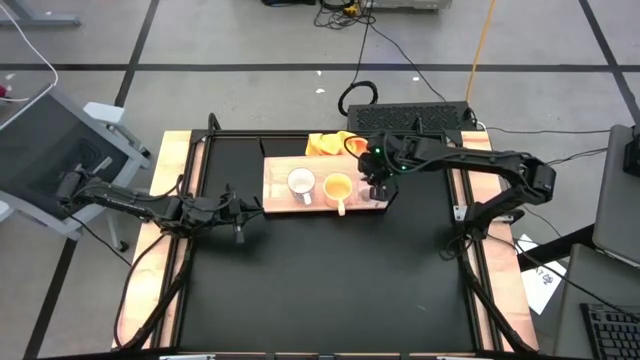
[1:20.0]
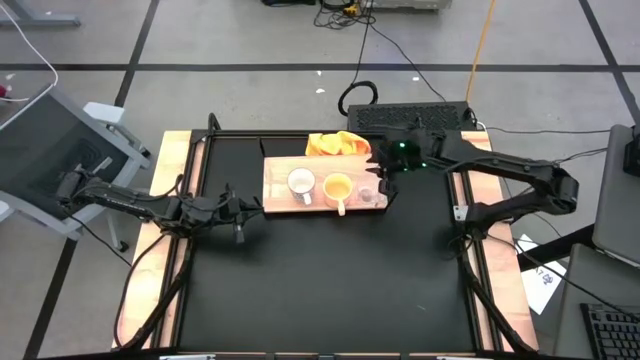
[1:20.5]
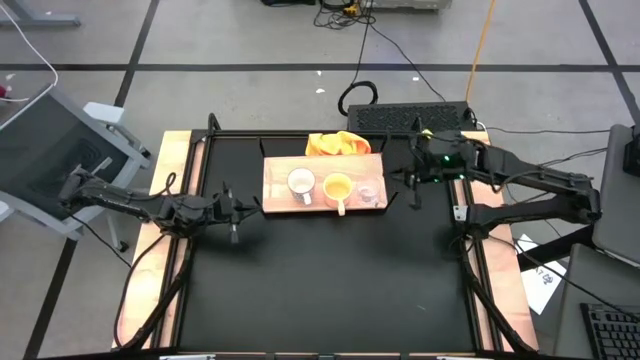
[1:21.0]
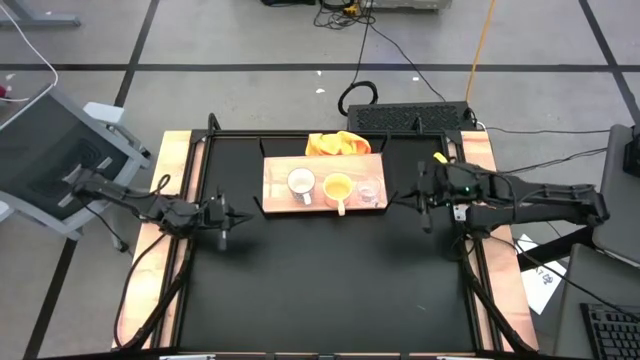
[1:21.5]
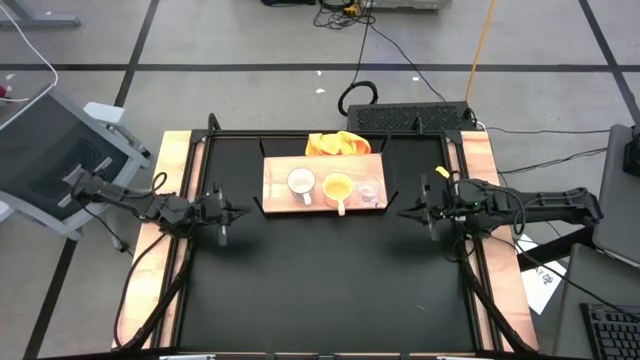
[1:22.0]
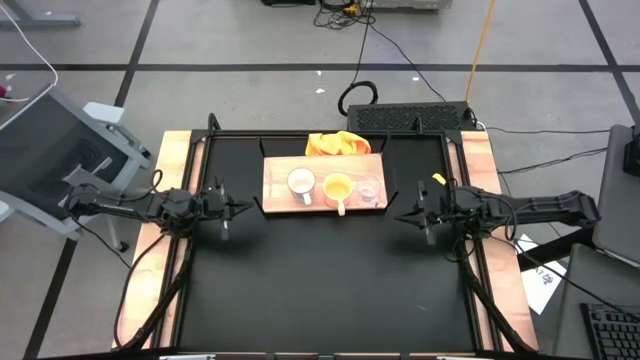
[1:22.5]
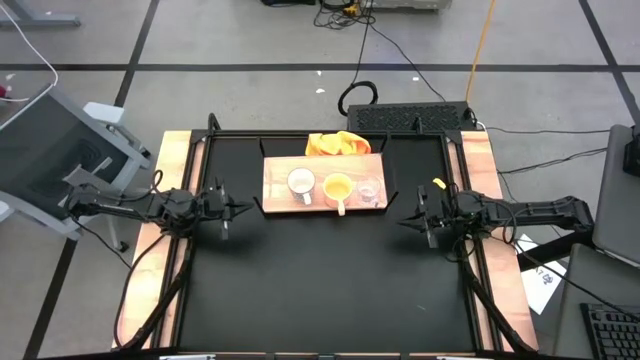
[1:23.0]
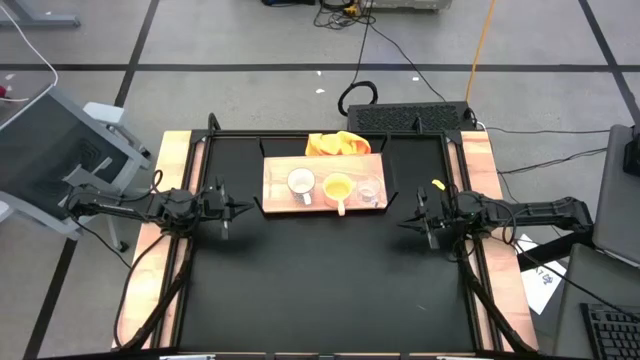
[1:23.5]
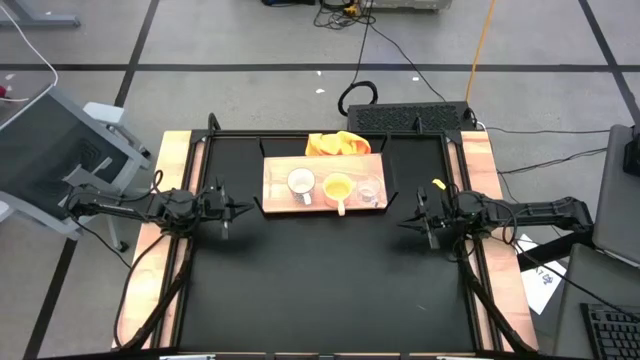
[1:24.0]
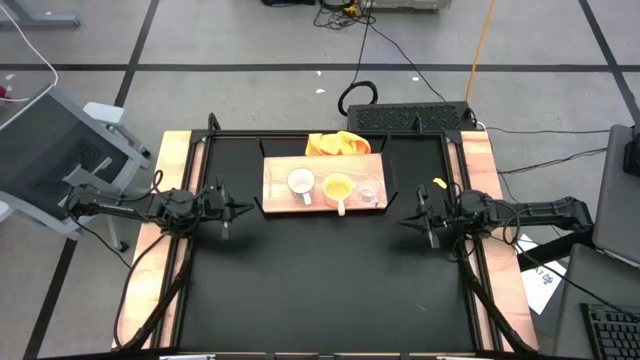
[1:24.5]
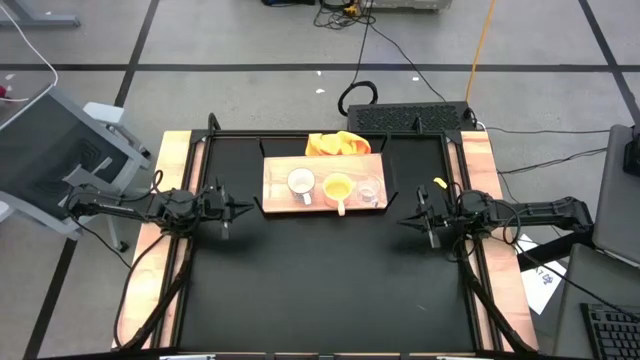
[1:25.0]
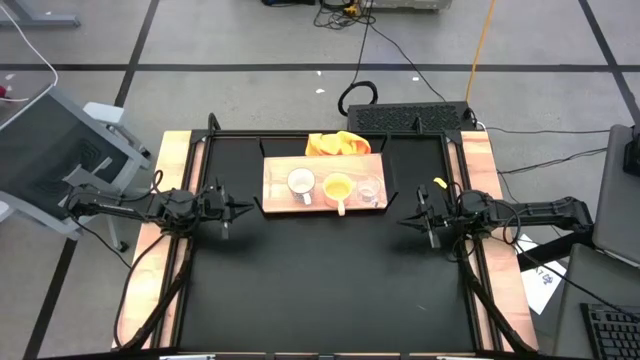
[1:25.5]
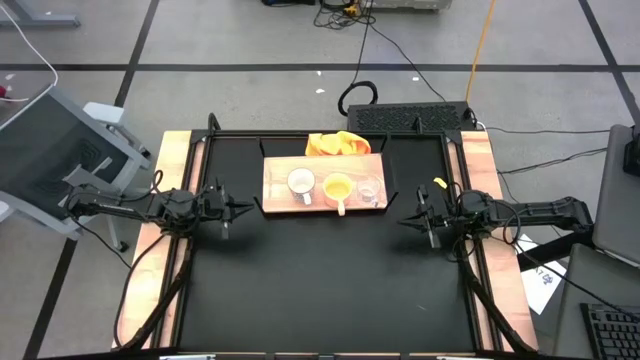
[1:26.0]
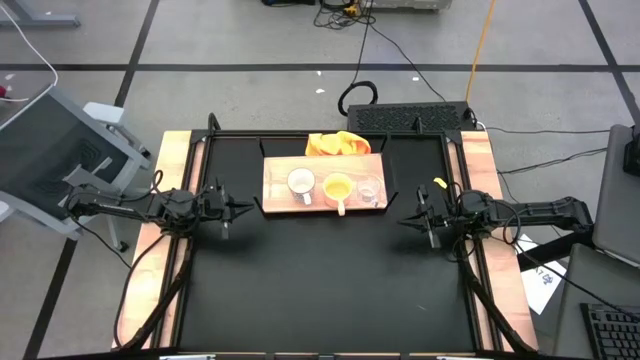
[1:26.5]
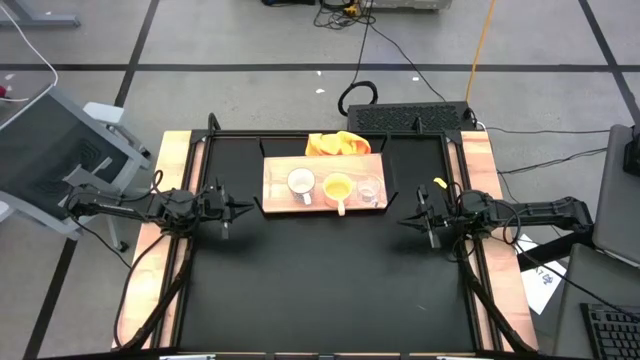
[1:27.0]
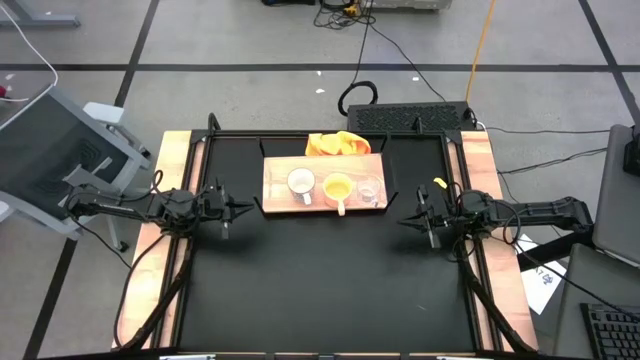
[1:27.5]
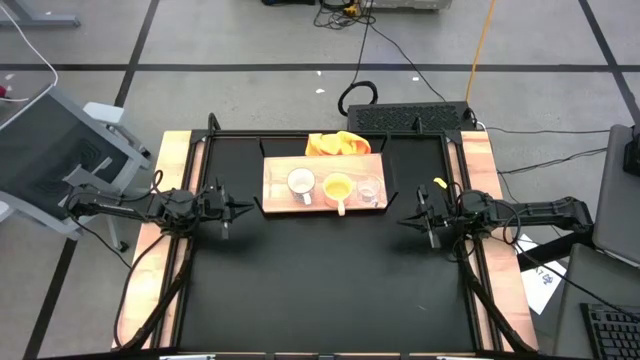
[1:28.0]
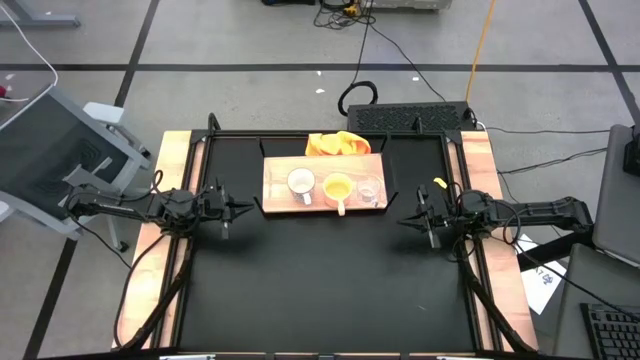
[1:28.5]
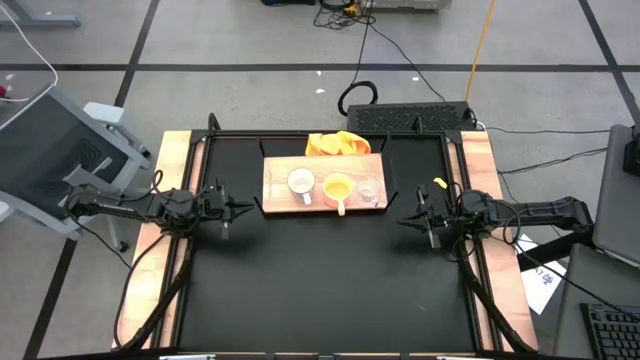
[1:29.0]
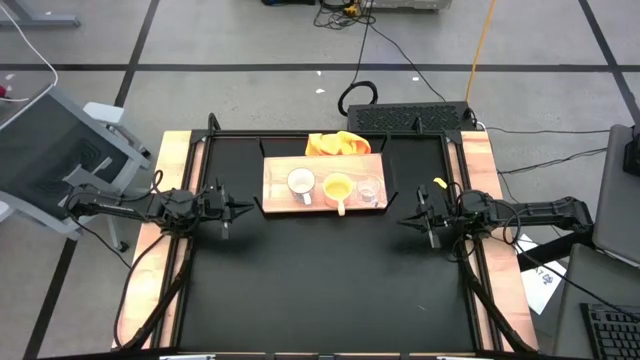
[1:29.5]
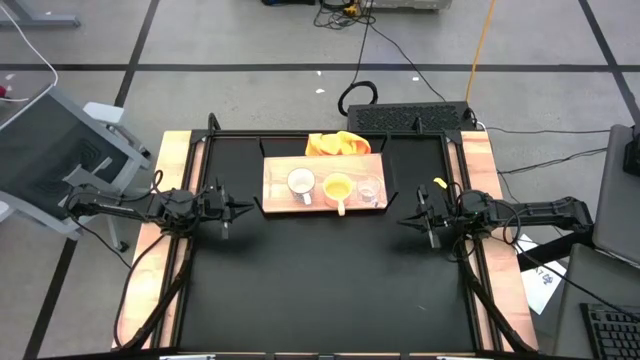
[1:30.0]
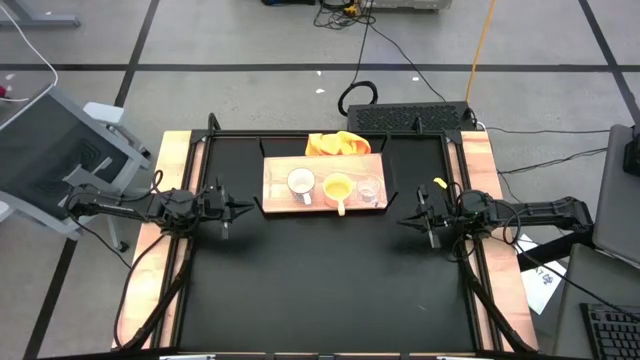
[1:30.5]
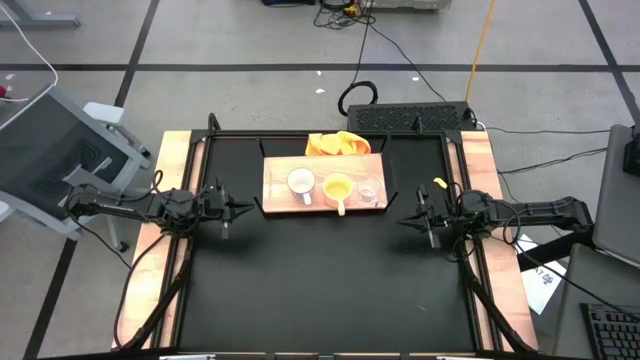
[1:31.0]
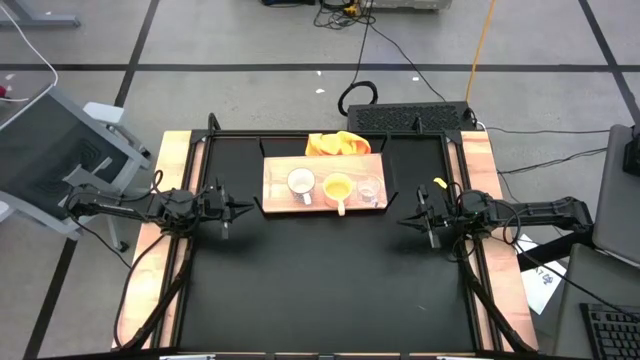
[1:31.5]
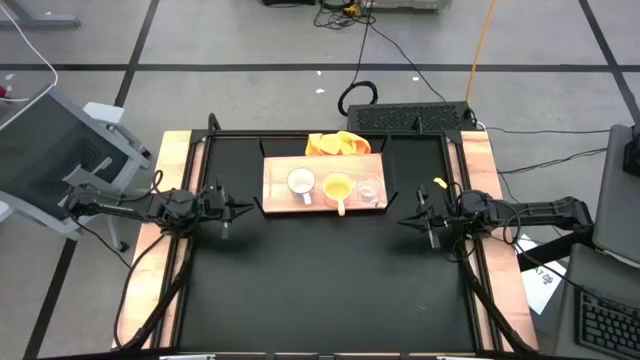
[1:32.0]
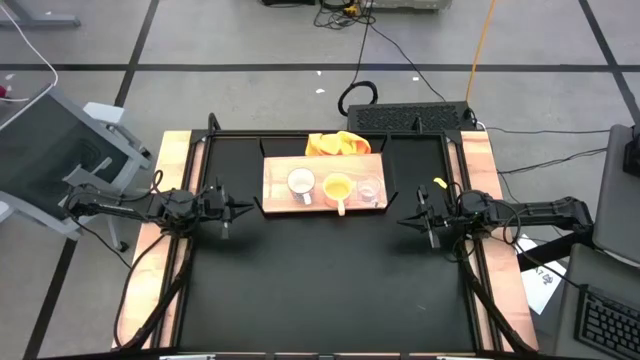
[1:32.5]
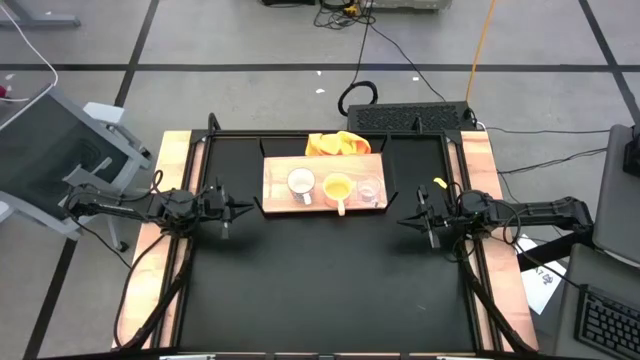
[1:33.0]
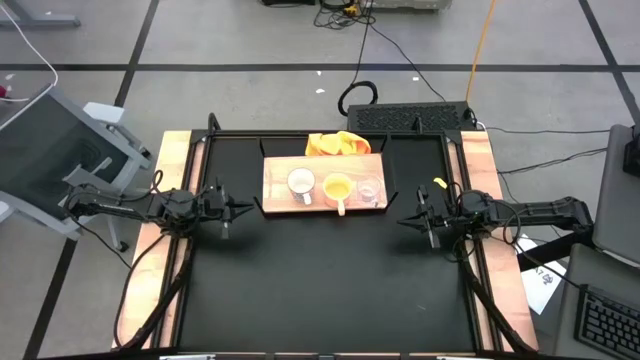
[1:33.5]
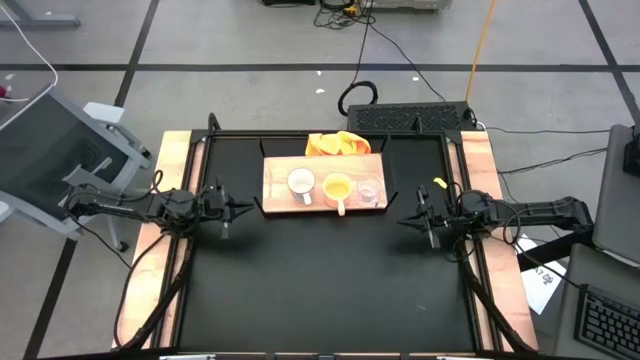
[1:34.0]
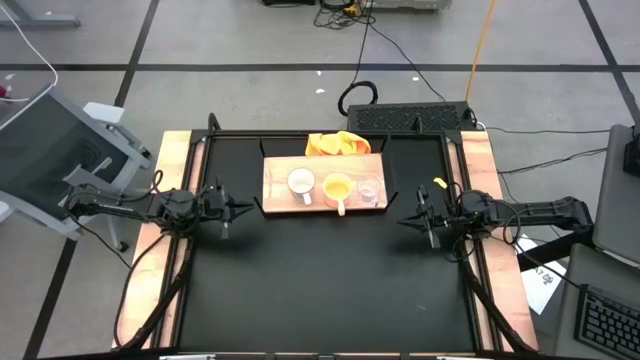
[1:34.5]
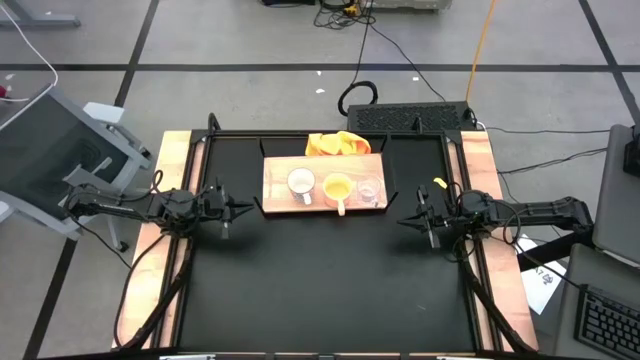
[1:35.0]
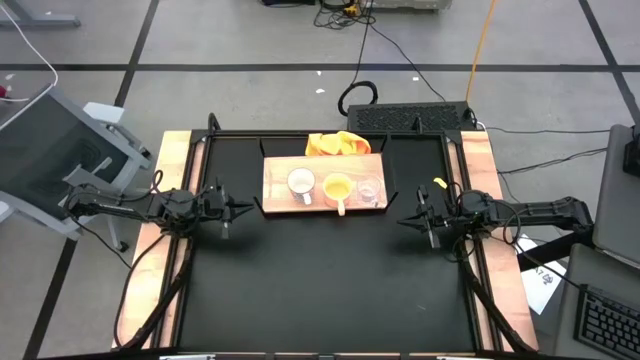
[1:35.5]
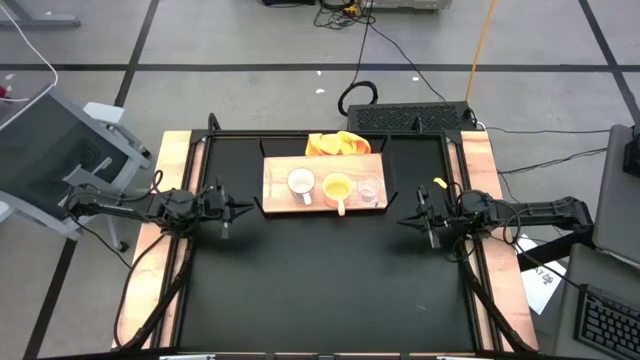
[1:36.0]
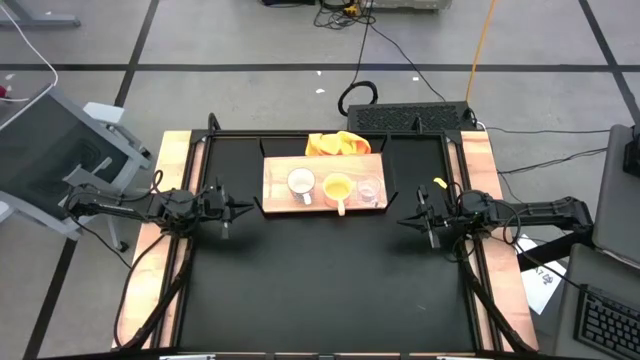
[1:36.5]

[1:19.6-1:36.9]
Task: Stack small to large cups/mugs on shelf
Return to Home Position

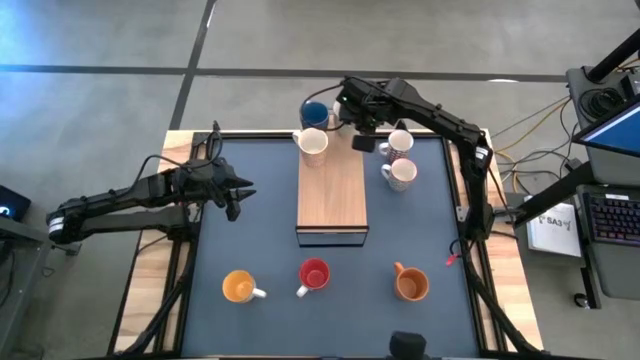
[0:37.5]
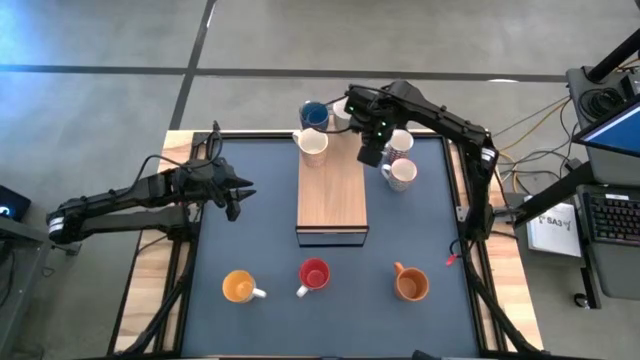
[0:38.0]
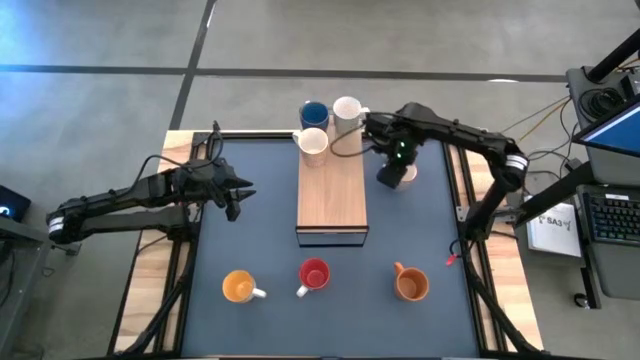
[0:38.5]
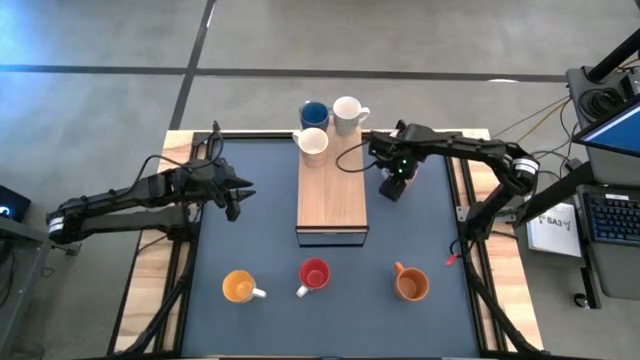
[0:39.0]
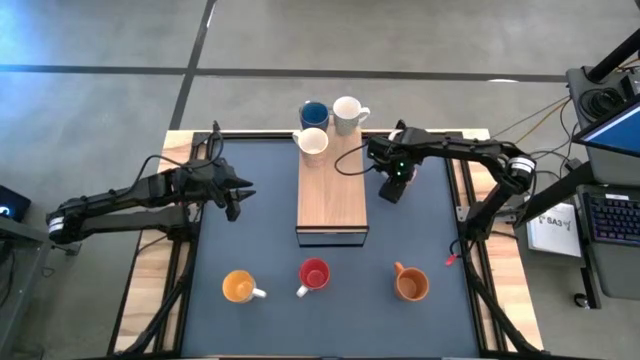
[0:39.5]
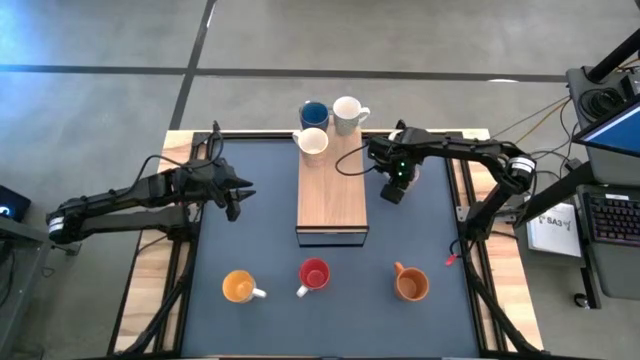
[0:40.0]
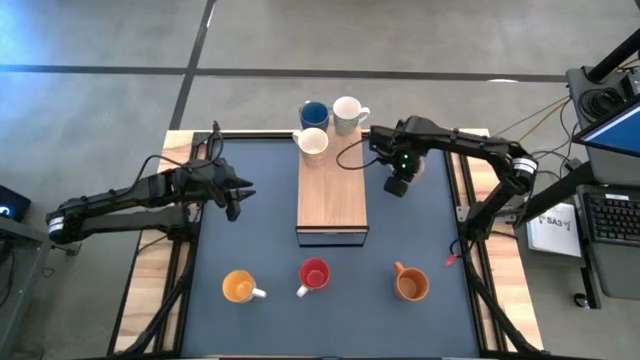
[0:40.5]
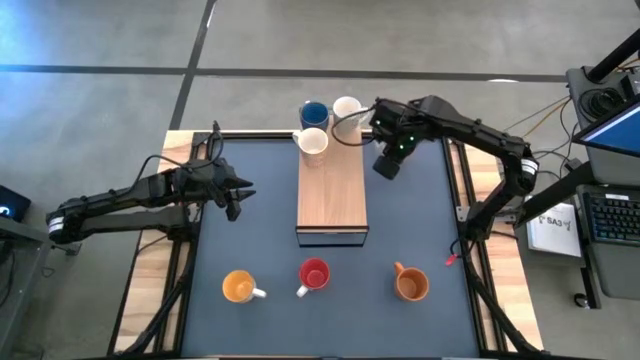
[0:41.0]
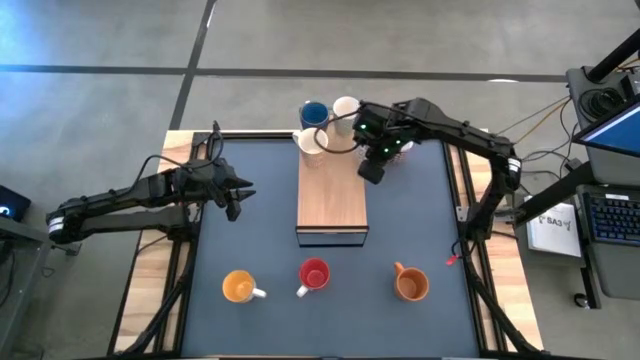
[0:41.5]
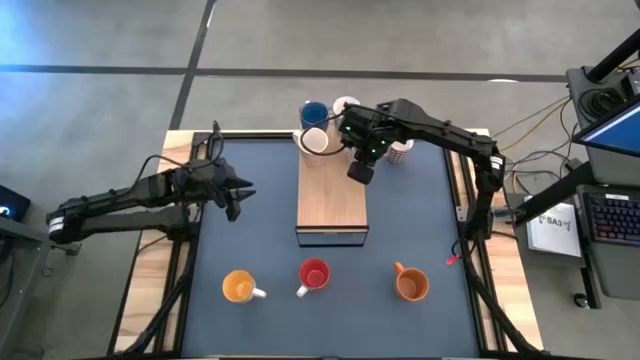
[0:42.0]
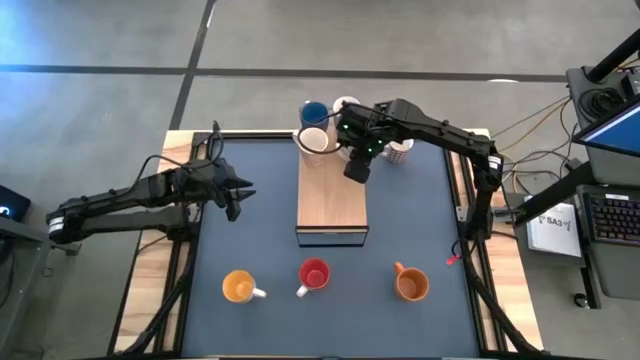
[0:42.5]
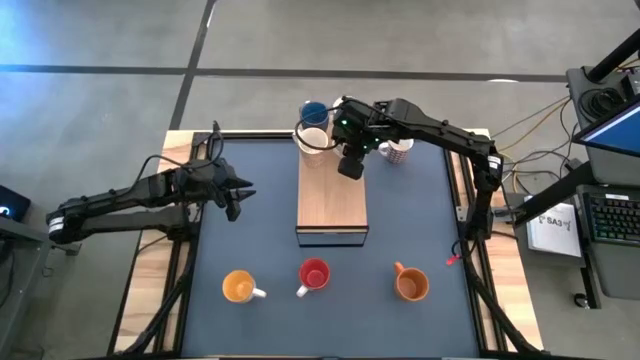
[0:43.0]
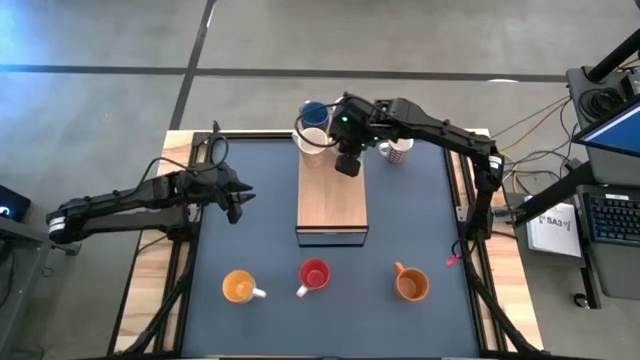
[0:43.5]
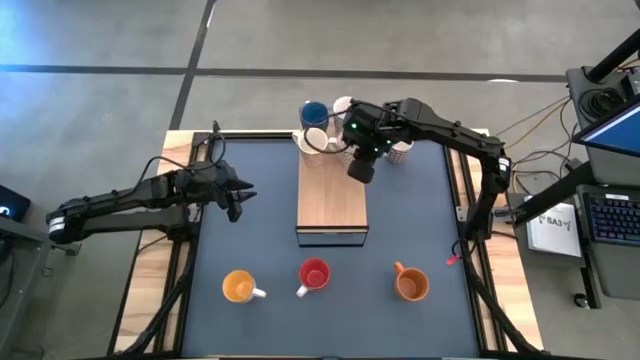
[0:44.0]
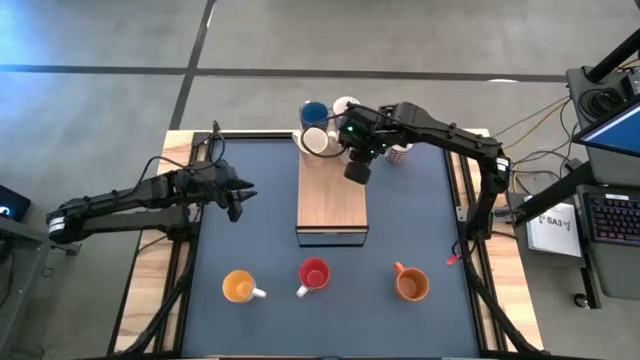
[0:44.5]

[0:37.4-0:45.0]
Task: Place coffee mugs
Put the gray patterned mug on the shelf
